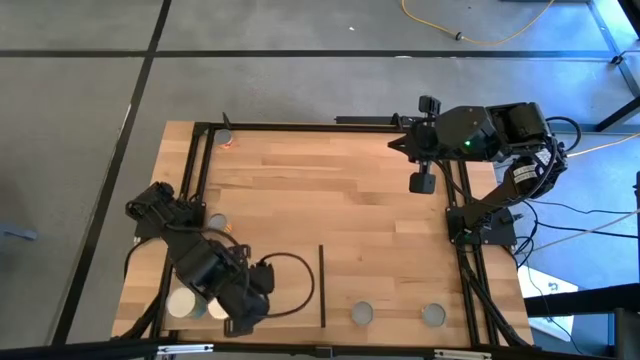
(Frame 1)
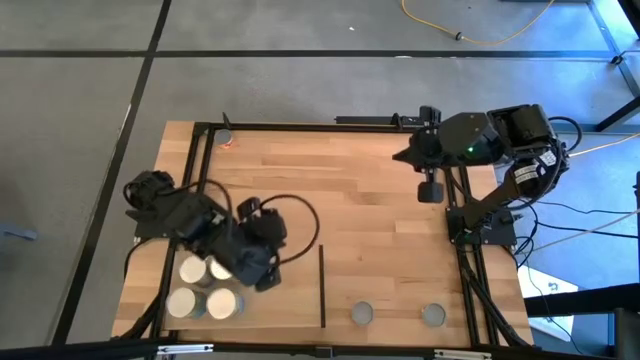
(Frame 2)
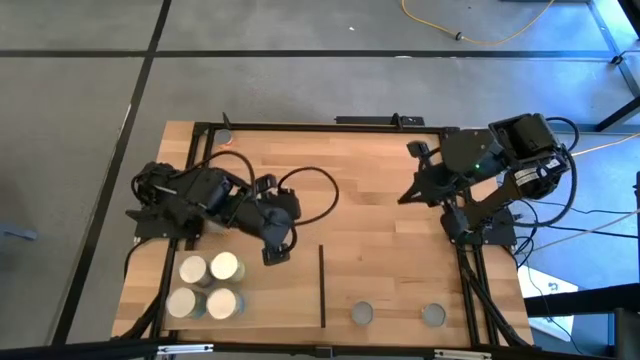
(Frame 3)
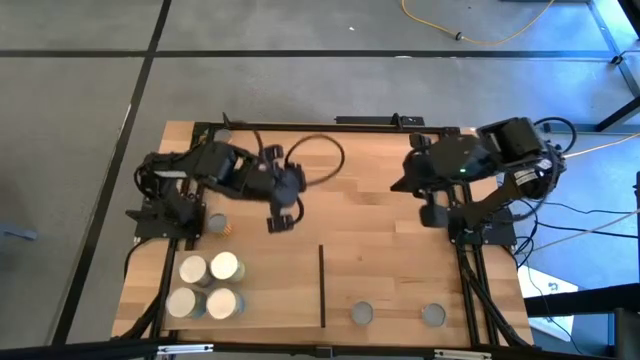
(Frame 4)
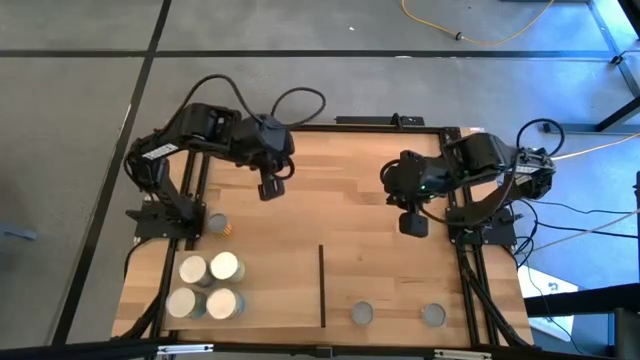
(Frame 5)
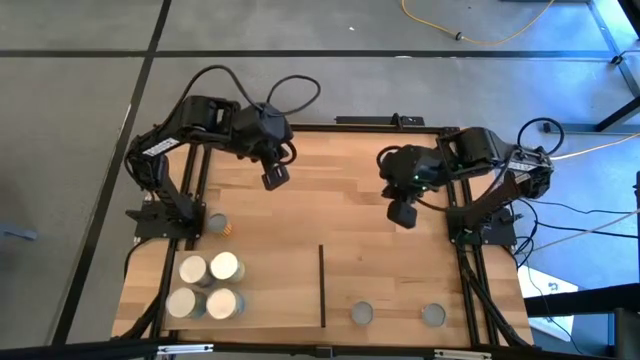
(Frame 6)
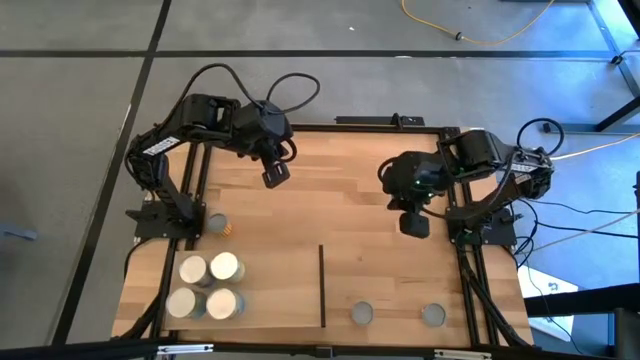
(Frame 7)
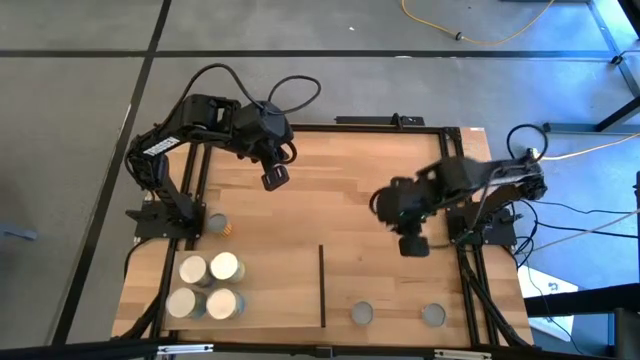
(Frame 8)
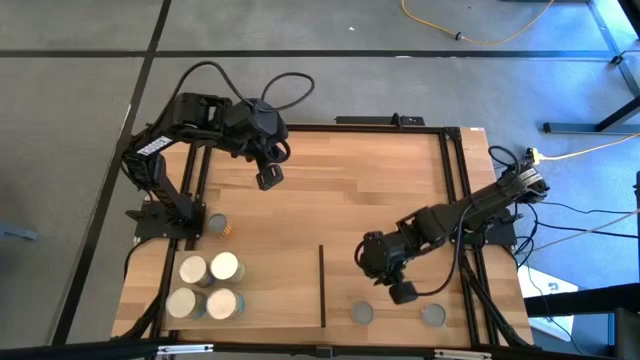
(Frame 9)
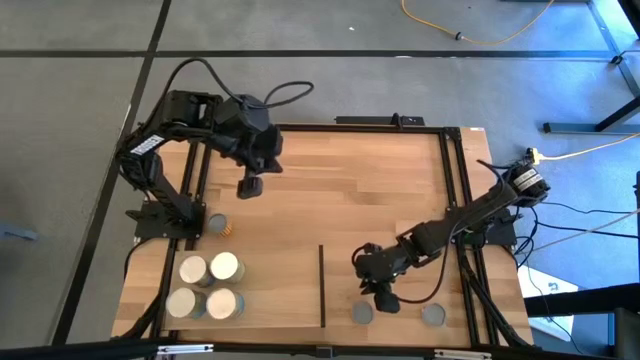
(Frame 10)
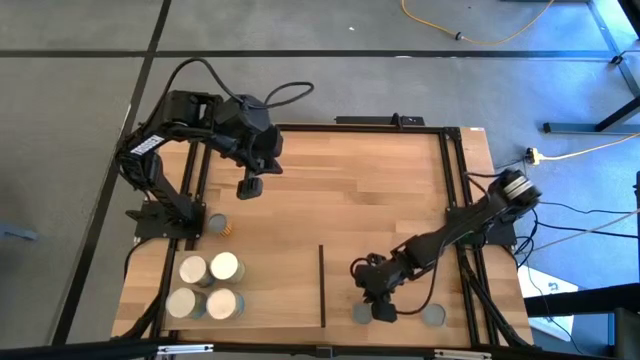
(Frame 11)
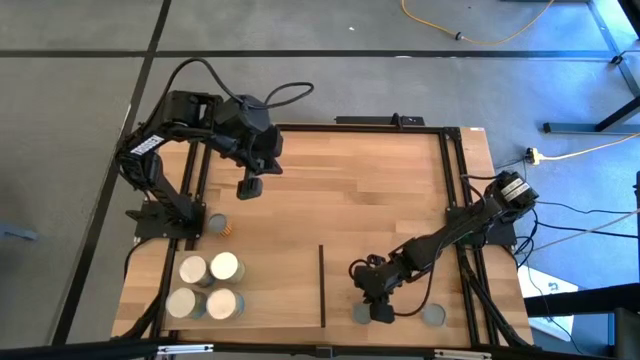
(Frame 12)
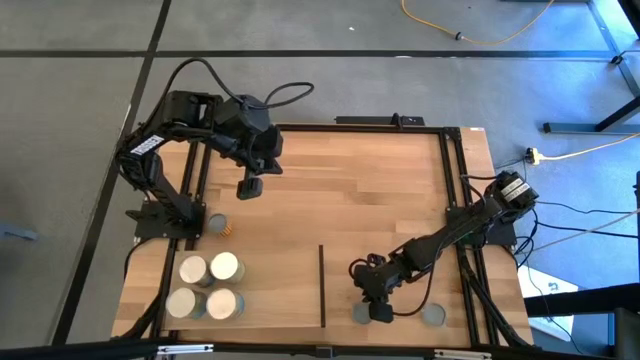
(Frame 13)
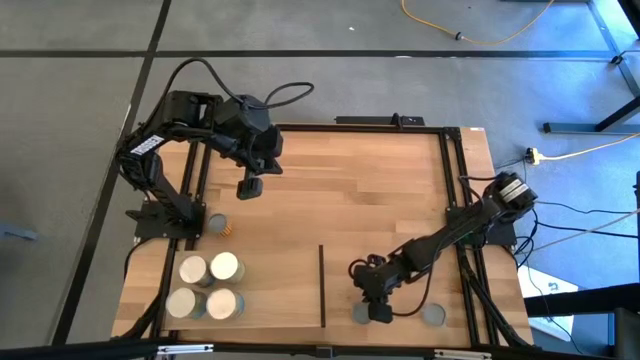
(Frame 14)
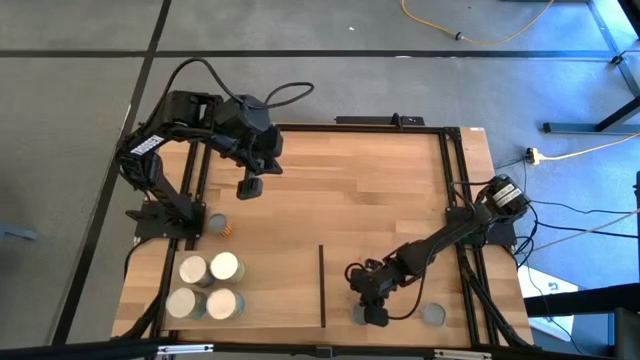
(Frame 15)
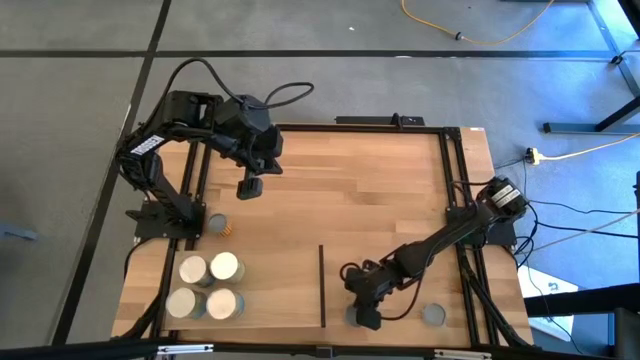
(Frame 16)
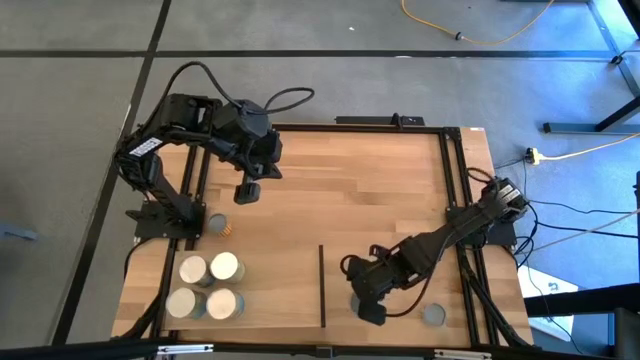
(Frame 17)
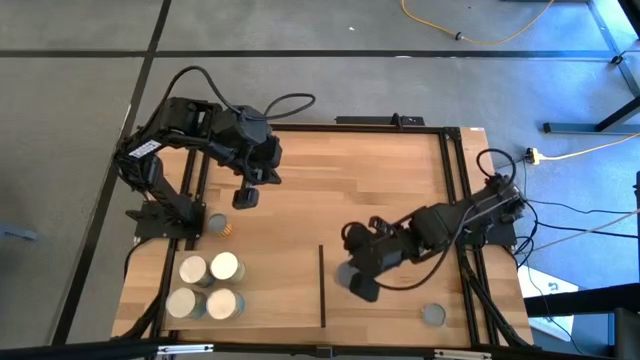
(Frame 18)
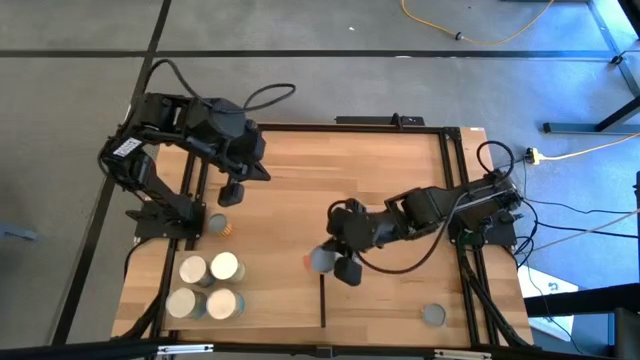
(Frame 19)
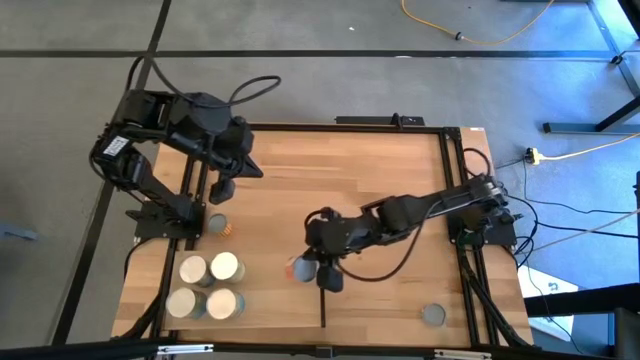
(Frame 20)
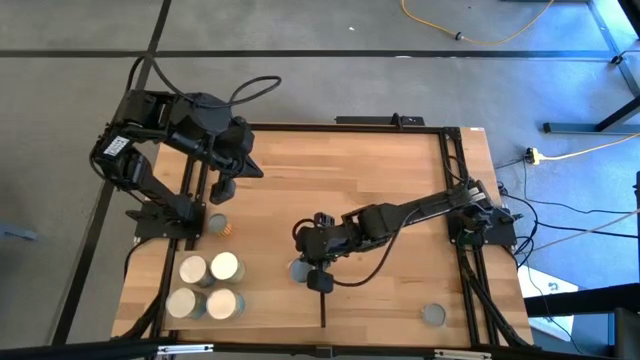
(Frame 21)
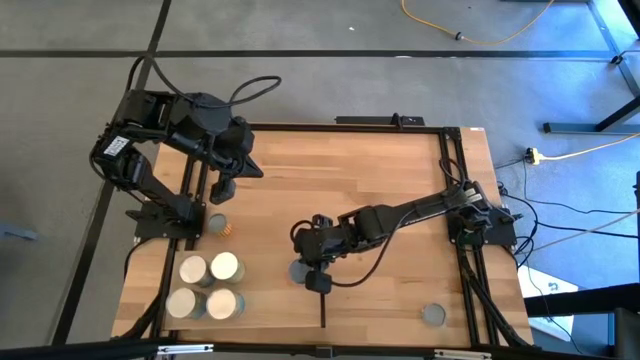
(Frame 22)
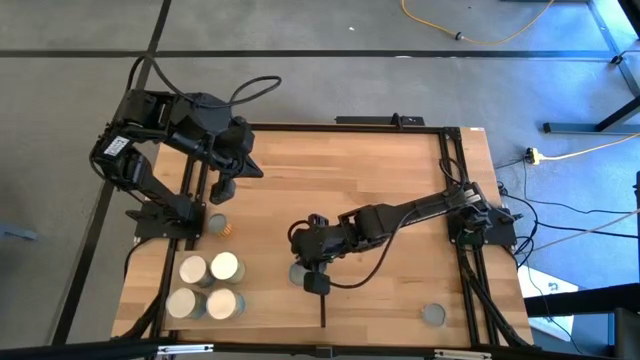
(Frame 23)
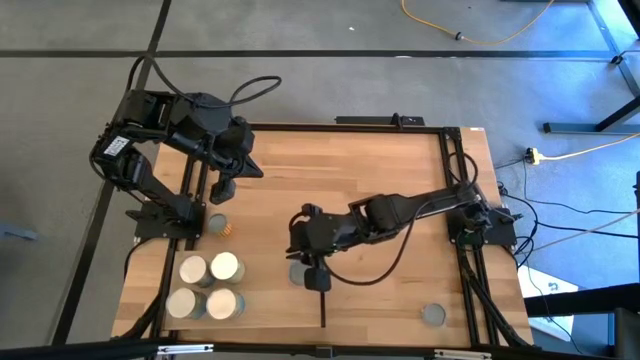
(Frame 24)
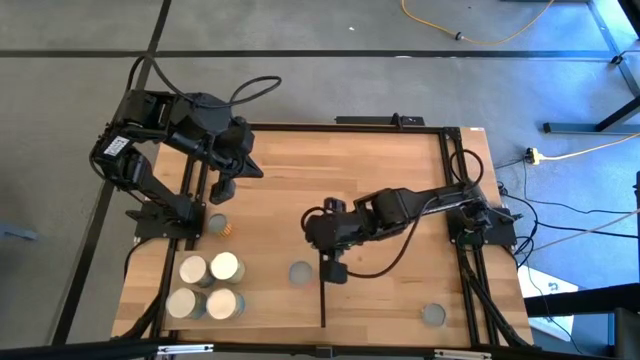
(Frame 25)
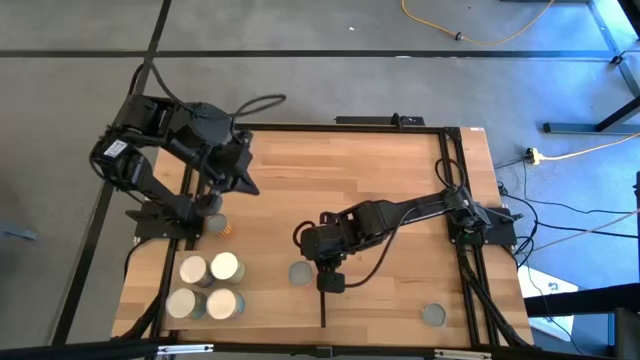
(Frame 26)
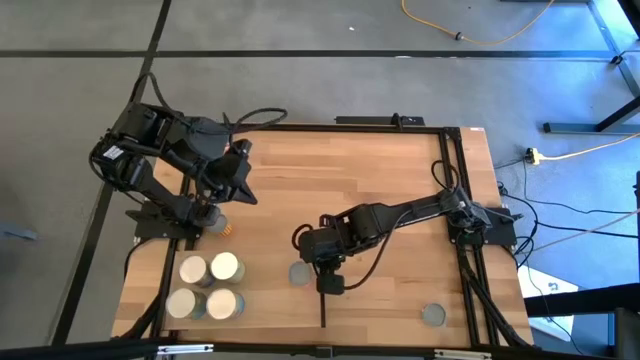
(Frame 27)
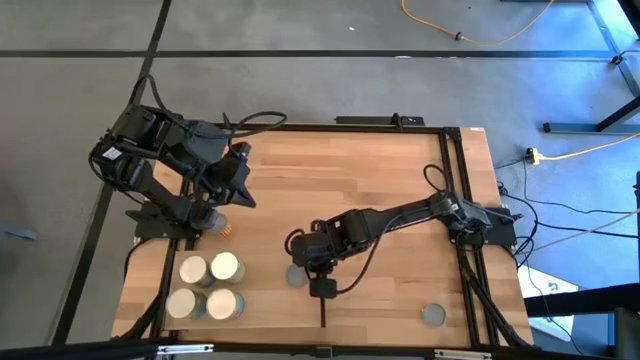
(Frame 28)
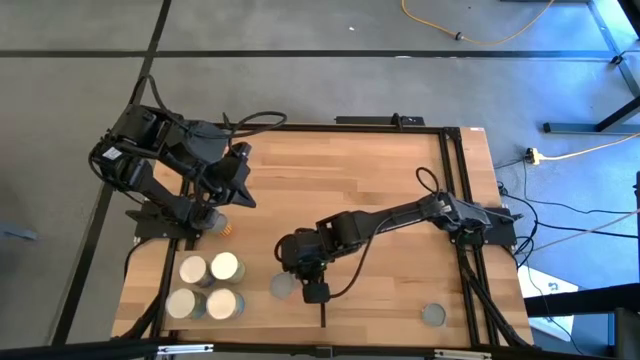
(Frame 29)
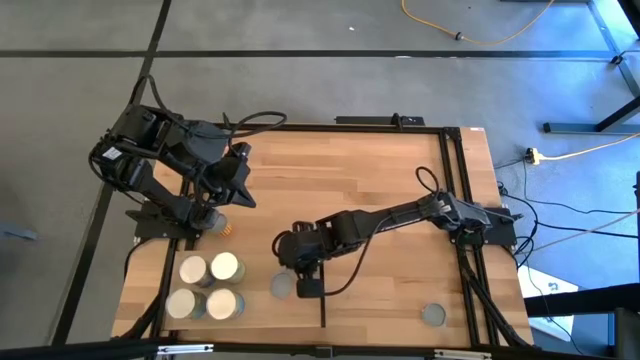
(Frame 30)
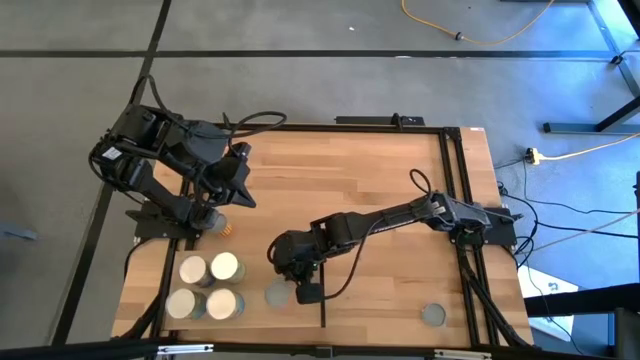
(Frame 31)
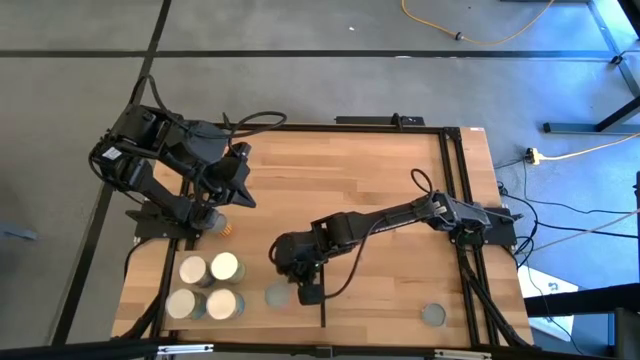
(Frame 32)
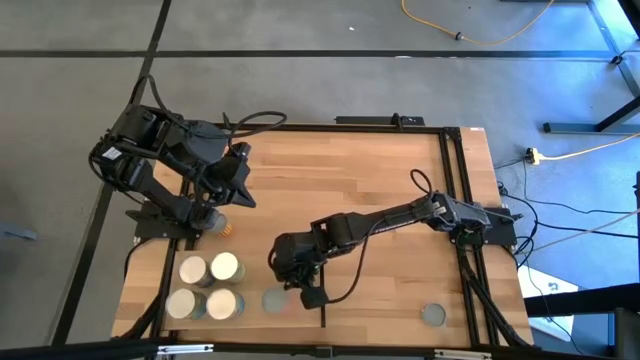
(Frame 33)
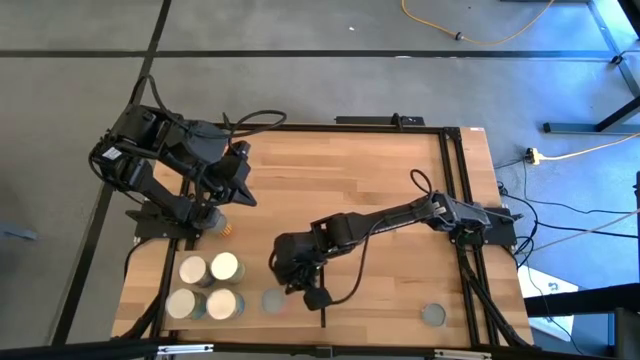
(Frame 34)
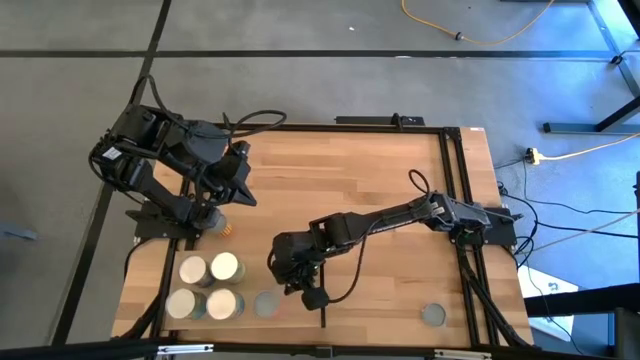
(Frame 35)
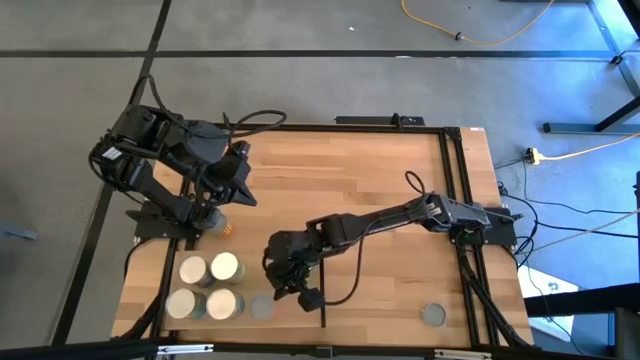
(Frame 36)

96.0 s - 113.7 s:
Task: Pick and place cans onto a shelf
Put the canned spaghetti sauce on the shelf

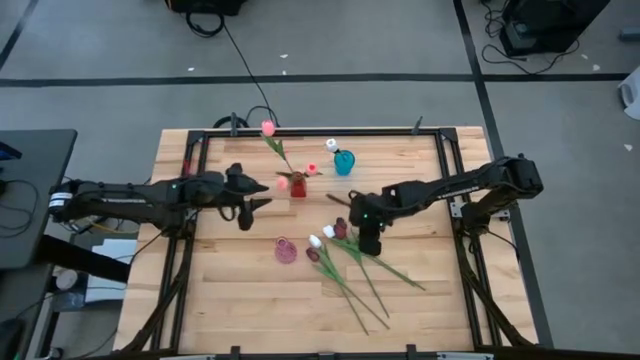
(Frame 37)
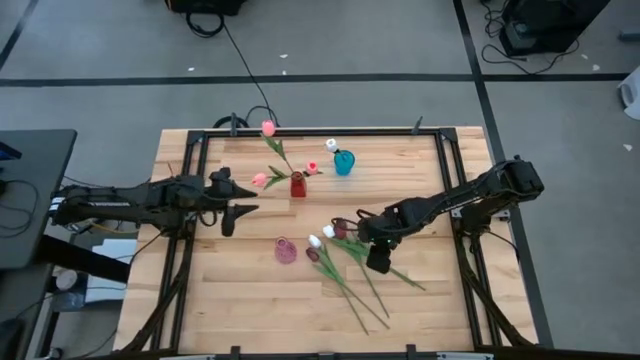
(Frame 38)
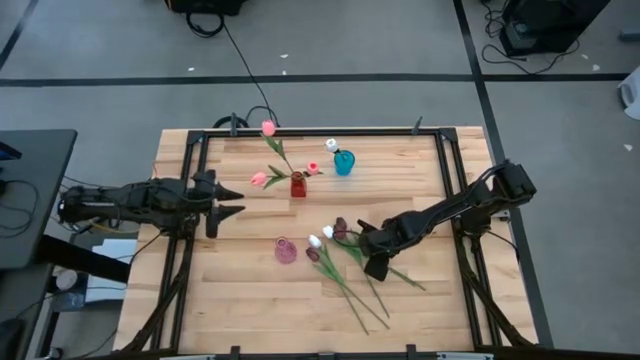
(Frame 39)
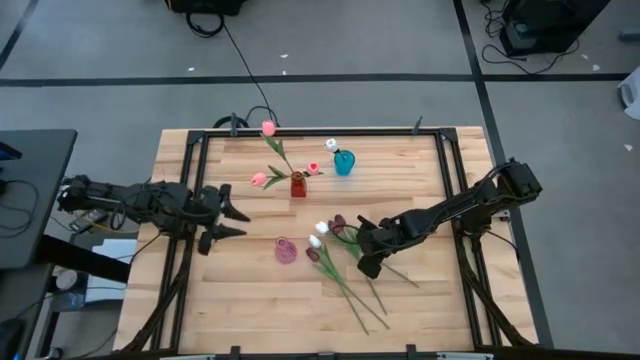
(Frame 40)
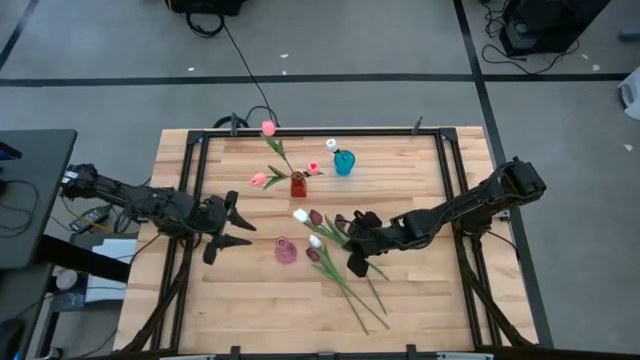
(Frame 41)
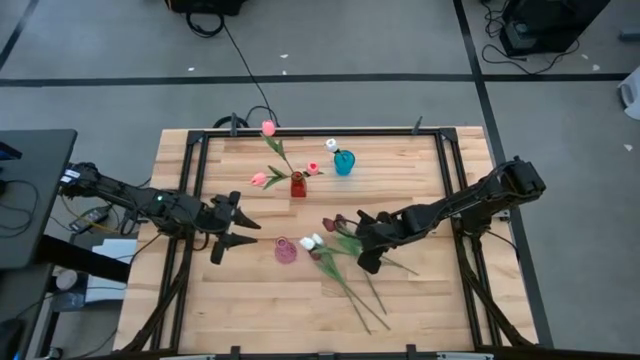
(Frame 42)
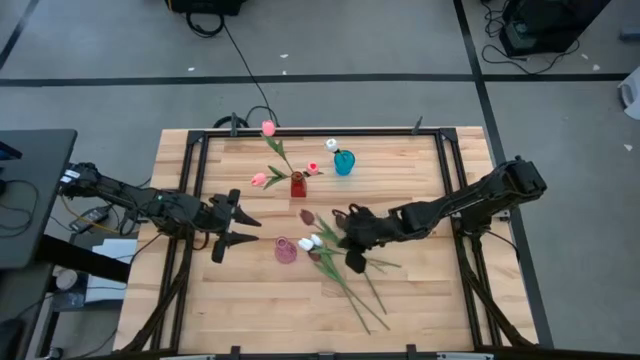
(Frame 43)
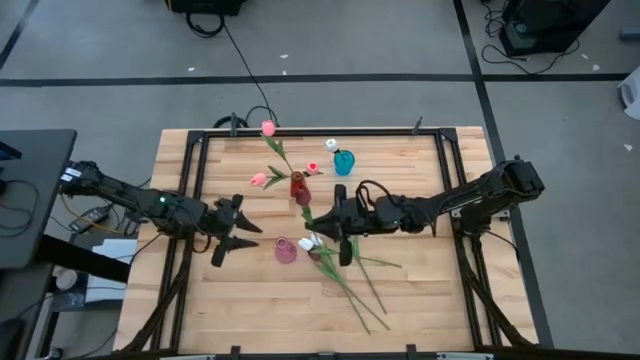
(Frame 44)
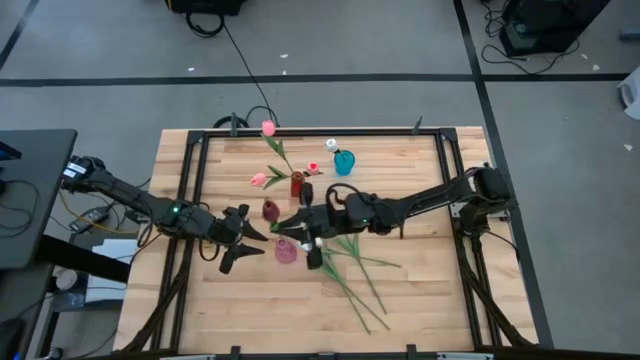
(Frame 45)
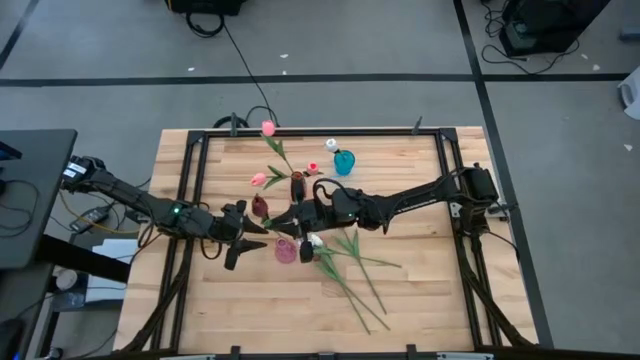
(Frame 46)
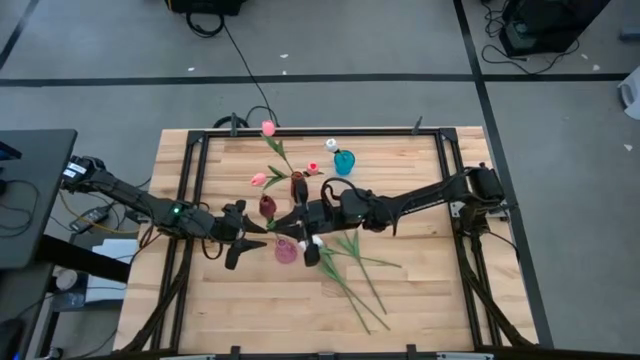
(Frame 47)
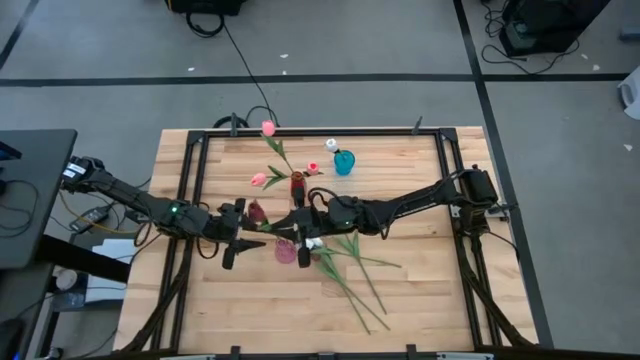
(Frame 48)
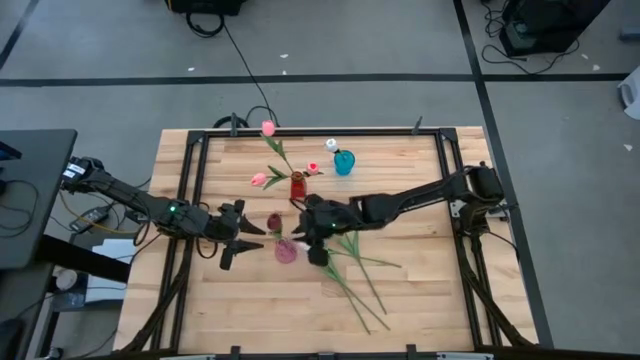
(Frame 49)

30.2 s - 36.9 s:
Task: Sort flowers into vase by color
Put the red flower into the purple vase
